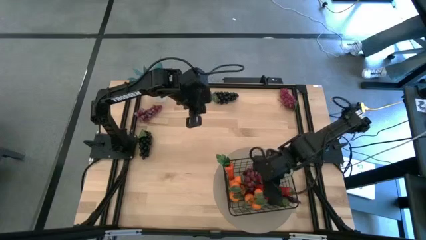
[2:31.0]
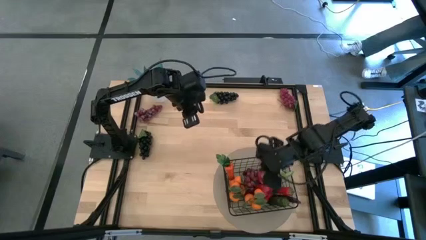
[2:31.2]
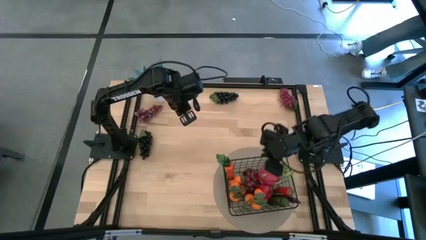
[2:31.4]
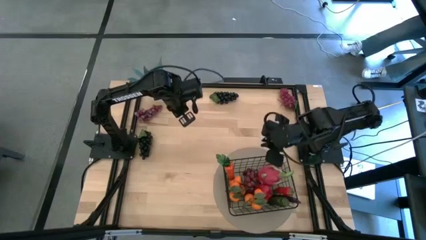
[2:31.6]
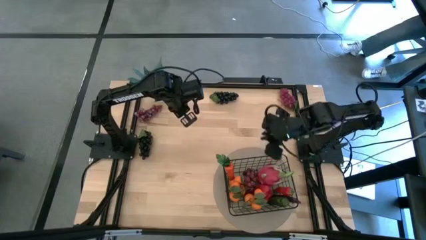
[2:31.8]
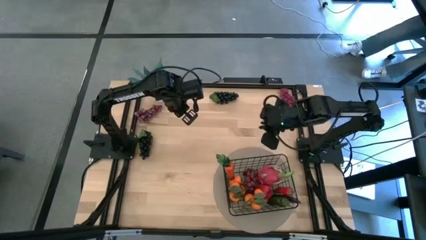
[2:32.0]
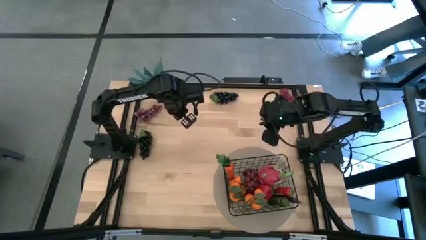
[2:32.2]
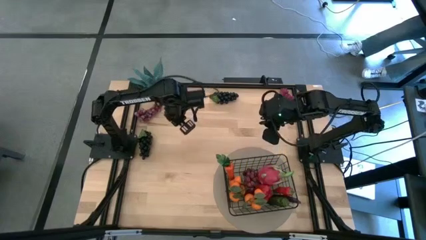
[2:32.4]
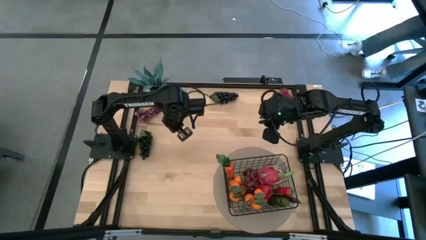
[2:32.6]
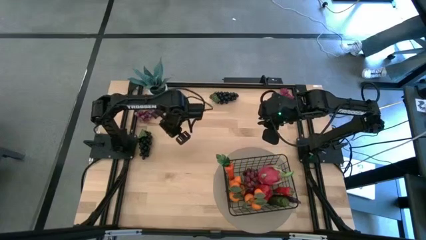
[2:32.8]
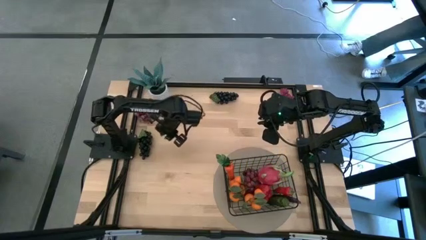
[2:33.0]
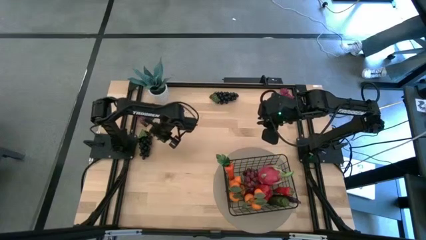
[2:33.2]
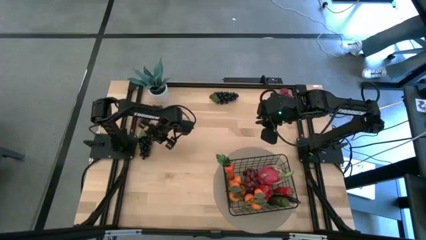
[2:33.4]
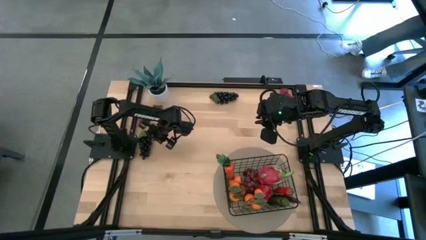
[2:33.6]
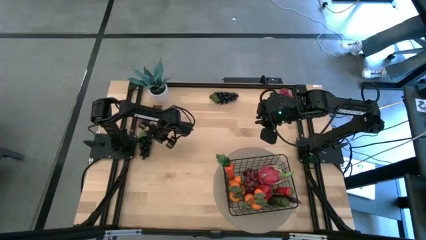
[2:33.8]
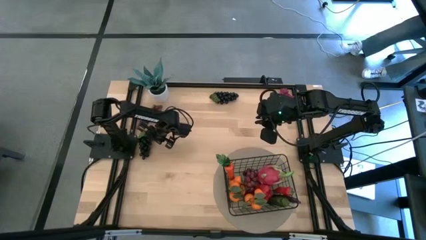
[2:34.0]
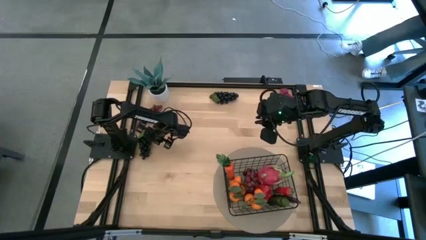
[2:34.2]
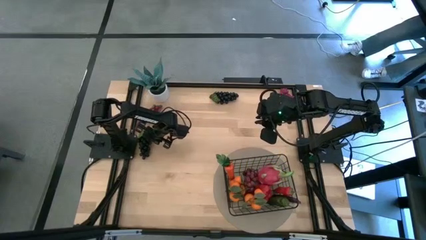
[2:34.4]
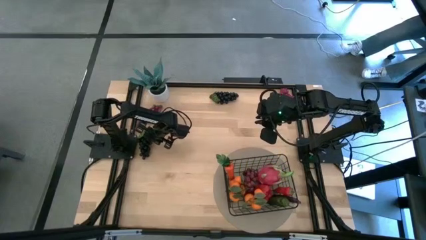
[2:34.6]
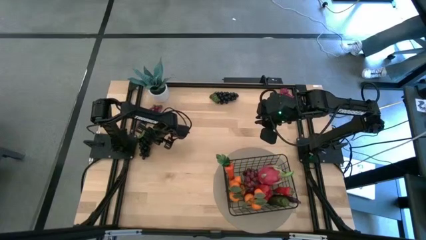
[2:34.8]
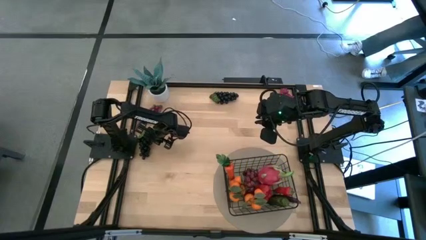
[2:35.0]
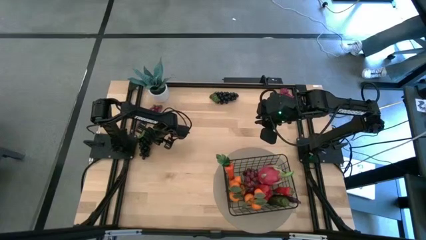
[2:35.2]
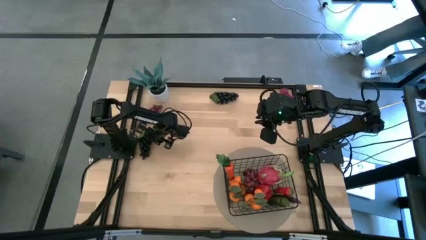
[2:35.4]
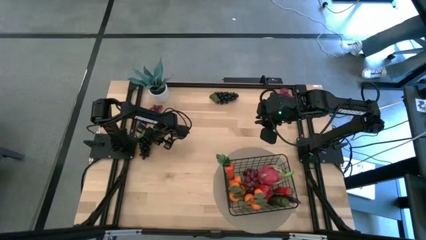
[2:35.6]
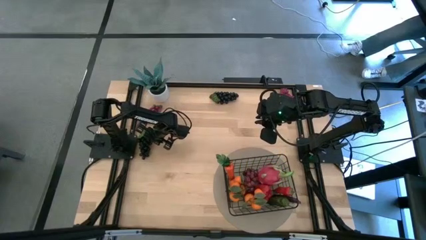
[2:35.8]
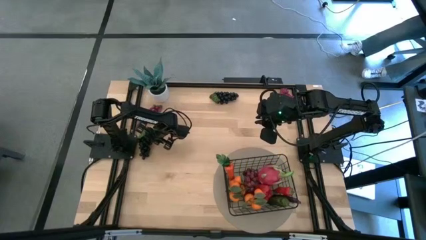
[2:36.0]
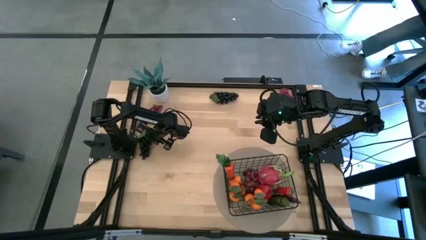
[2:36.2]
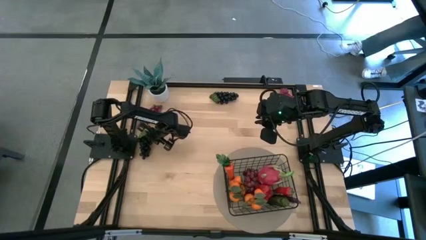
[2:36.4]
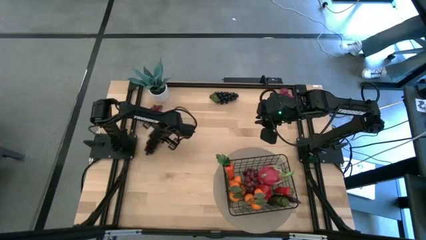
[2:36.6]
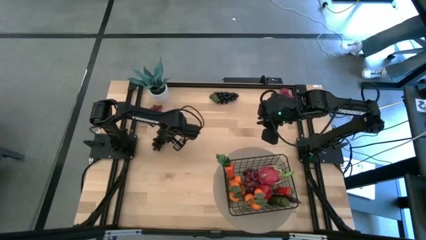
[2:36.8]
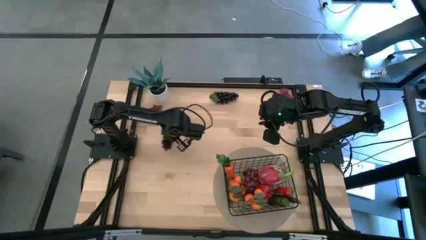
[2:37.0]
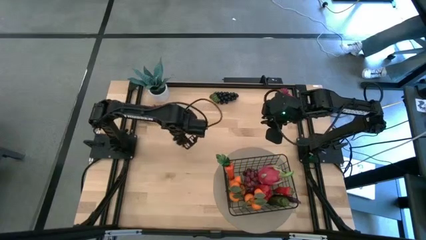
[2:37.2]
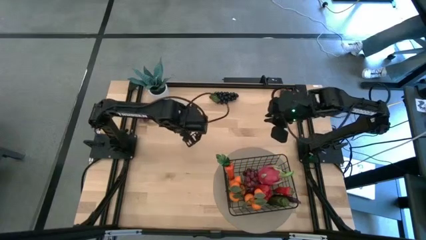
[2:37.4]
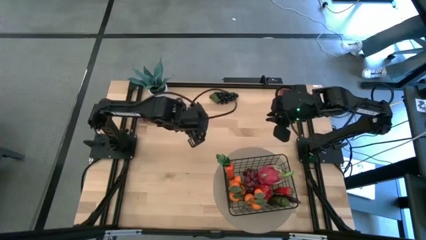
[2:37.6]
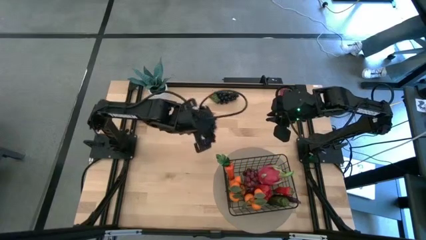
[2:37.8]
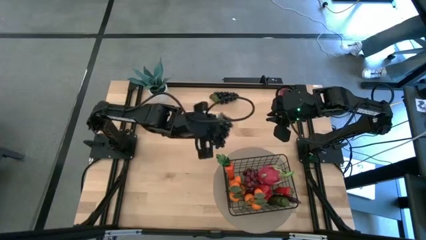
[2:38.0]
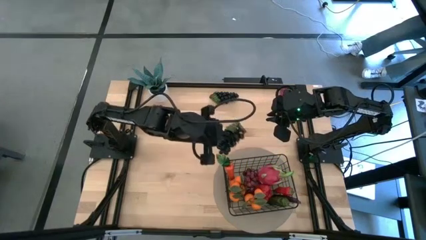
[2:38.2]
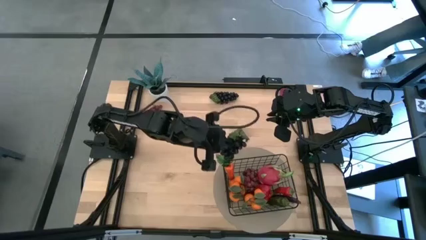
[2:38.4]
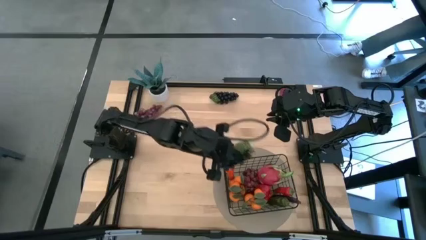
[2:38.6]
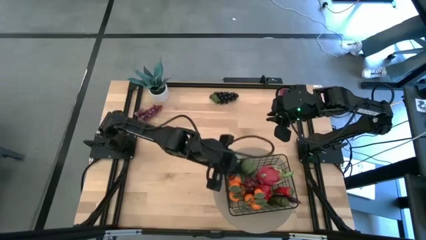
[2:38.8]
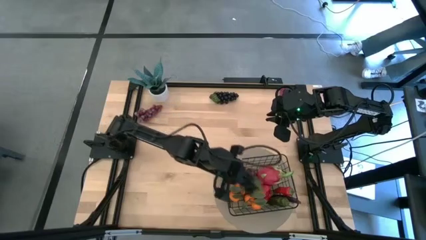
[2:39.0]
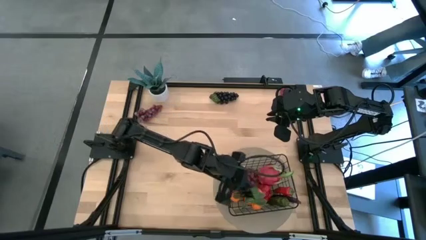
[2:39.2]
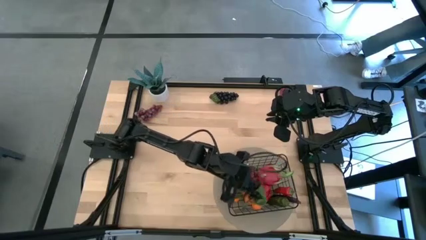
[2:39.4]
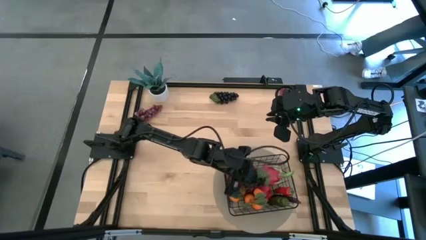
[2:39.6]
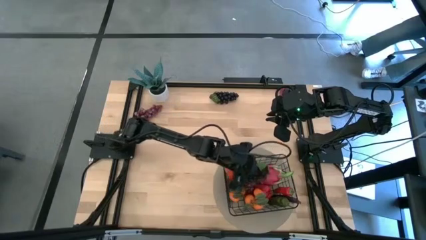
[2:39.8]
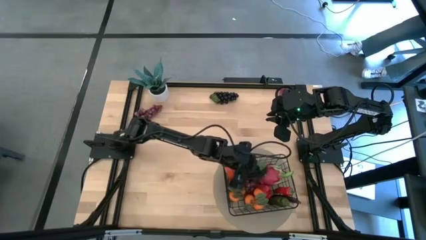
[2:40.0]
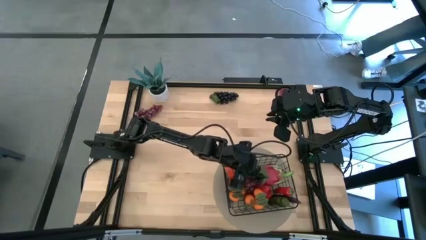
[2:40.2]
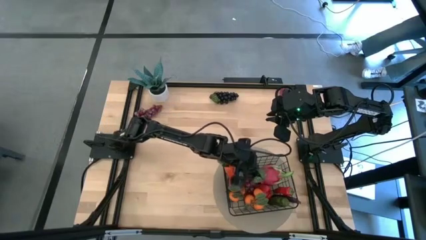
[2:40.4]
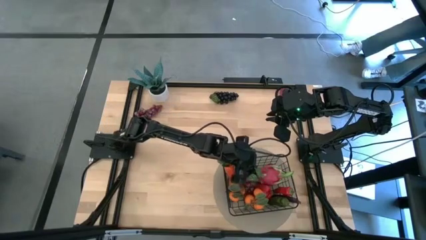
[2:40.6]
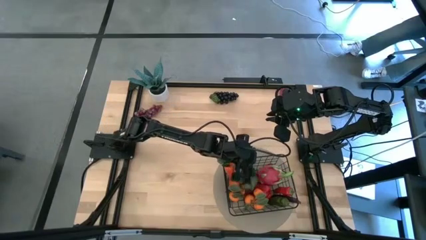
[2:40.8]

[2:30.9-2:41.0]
Task: Build produce basket
Put the middle left black grapes into the wire basket

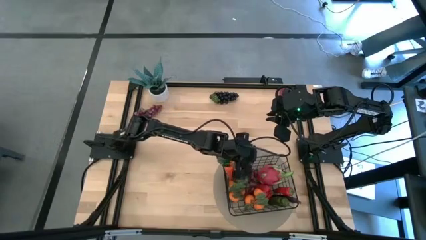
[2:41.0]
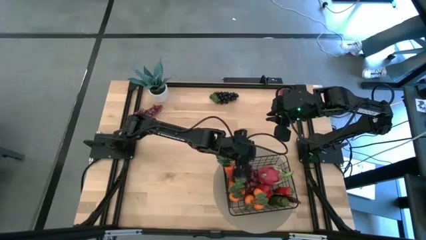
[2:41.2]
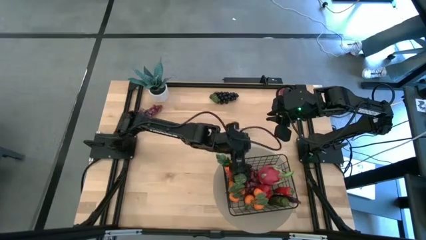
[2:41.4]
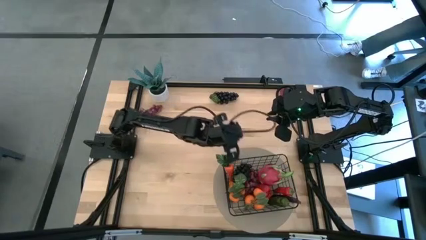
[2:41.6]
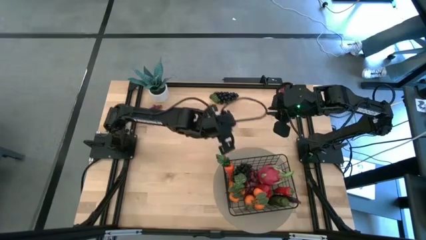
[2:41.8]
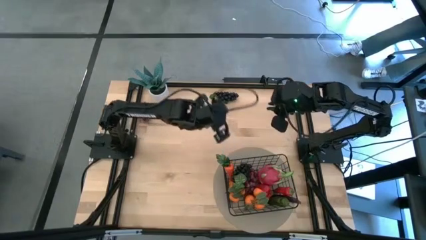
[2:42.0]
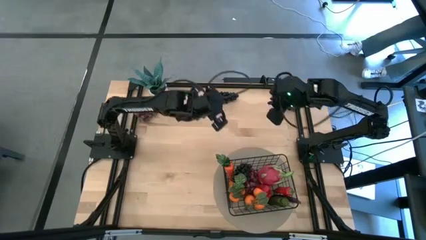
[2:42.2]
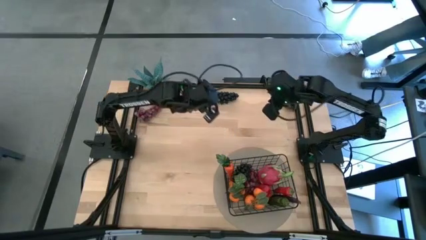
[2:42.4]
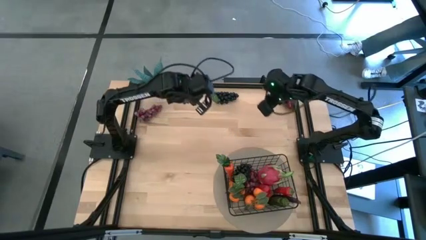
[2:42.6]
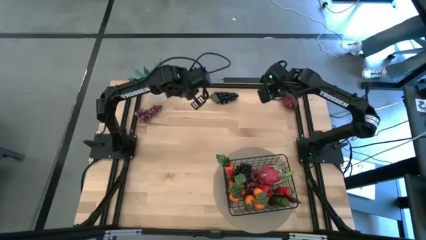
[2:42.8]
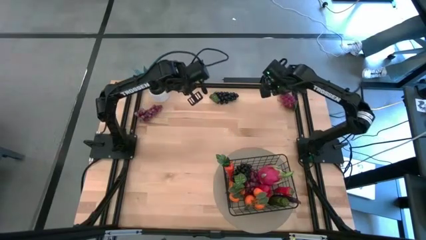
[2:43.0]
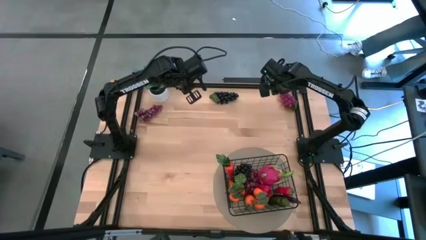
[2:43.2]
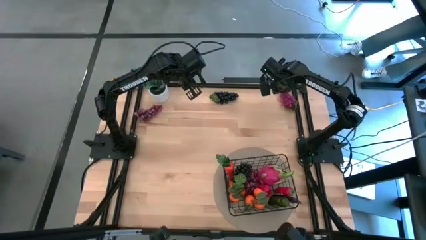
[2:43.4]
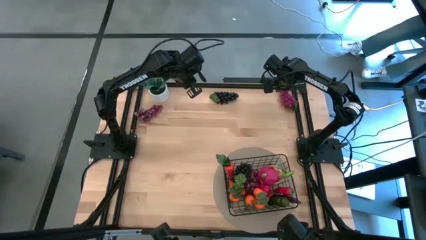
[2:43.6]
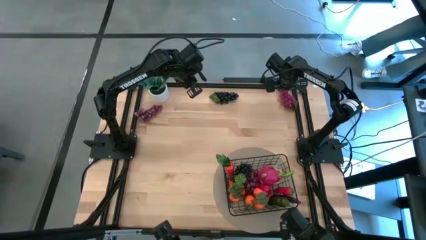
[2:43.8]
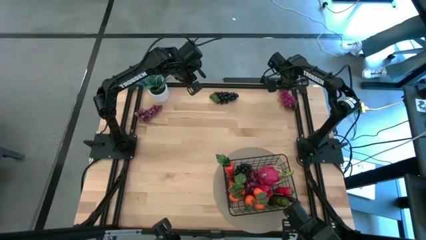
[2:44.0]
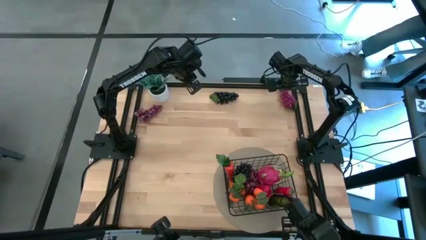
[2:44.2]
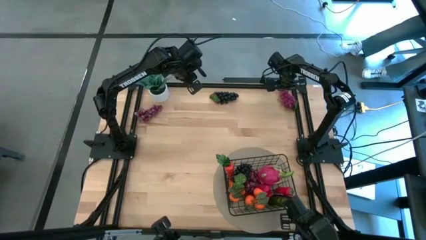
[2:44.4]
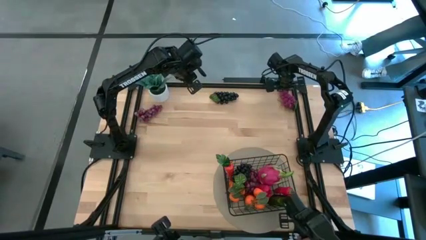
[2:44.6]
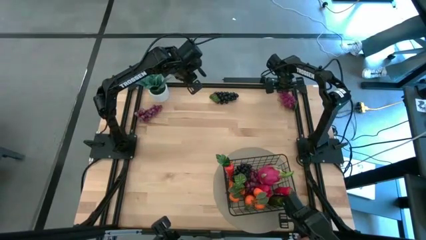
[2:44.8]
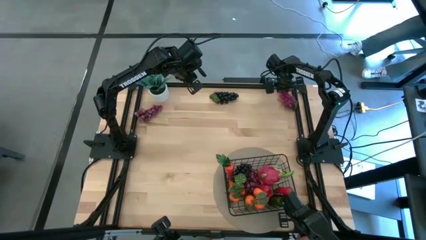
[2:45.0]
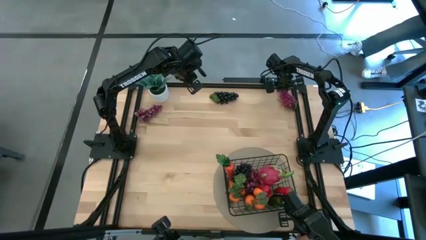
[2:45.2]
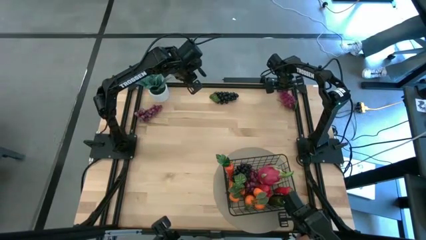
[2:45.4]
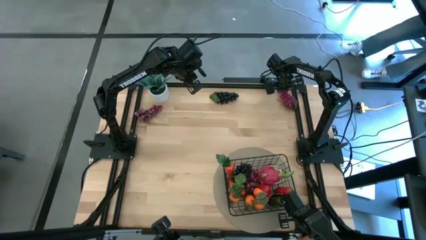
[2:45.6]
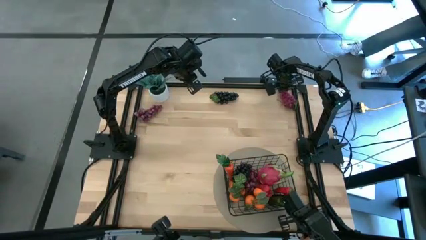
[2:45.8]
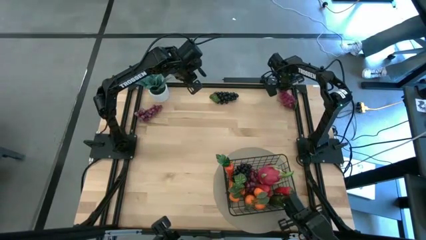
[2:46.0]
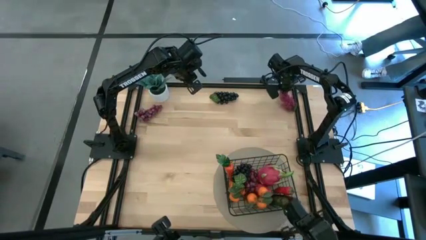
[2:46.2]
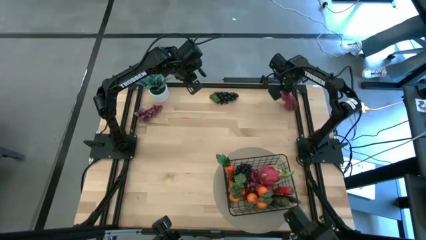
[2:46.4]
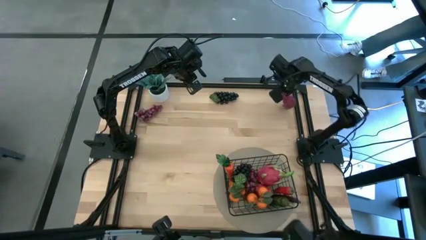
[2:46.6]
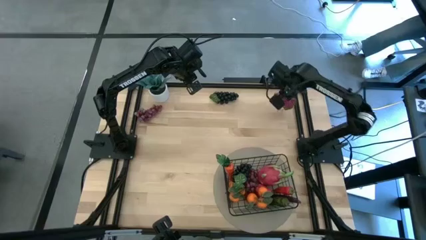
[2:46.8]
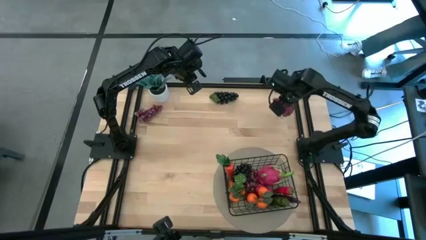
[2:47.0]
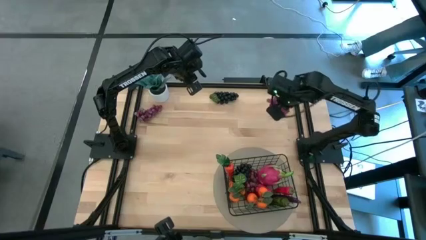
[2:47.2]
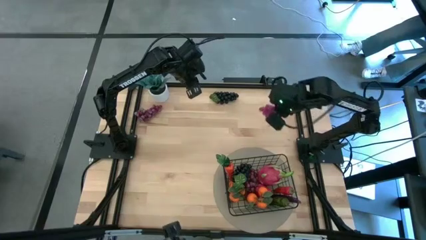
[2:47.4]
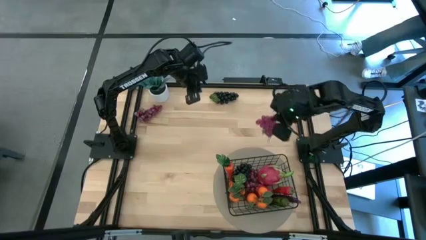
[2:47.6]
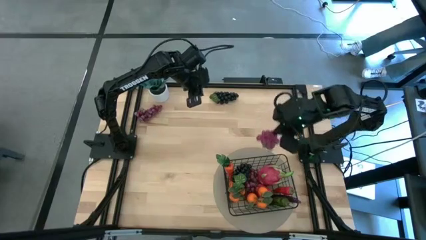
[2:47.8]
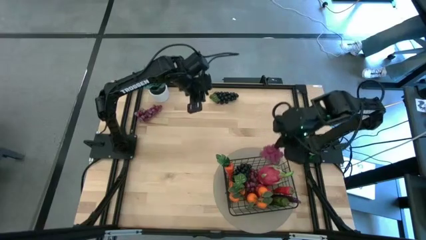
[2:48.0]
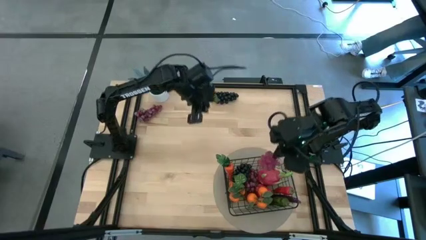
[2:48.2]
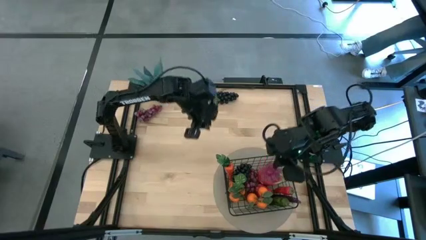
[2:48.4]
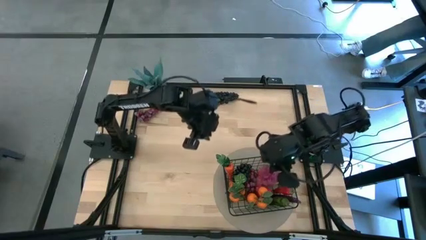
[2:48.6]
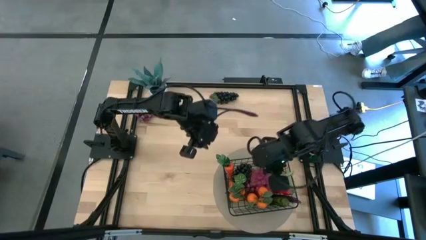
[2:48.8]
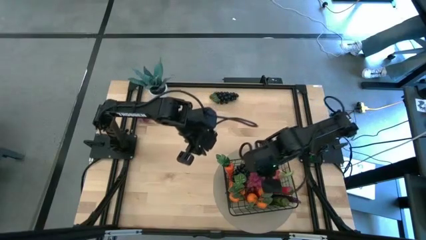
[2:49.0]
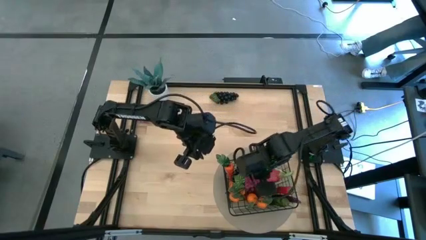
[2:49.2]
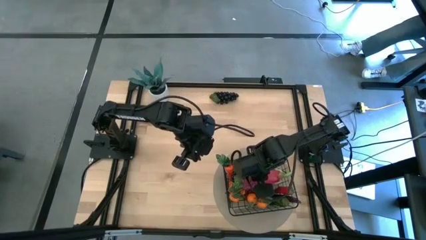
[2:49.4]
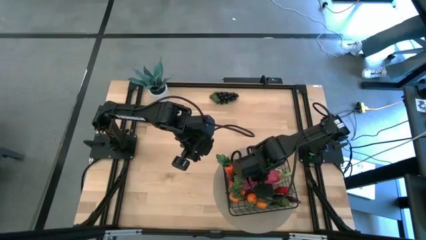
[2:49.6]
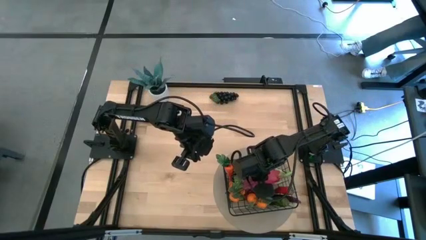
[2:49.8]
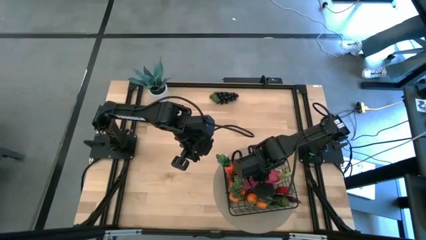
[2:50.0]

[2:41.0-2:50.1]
Put the top right grapes into the wire basket
